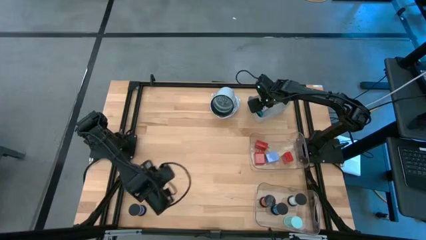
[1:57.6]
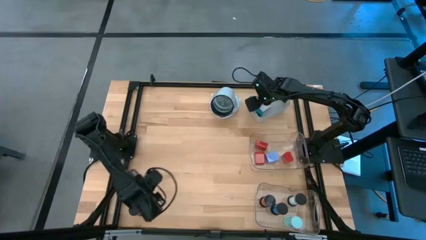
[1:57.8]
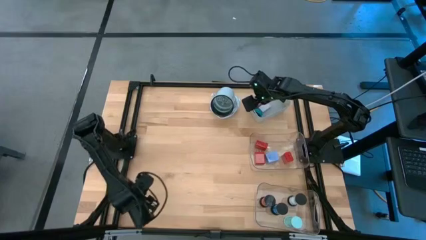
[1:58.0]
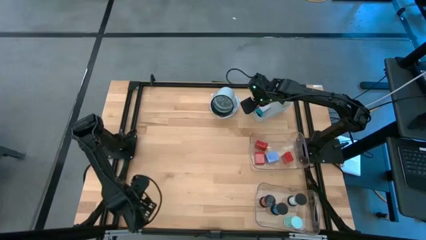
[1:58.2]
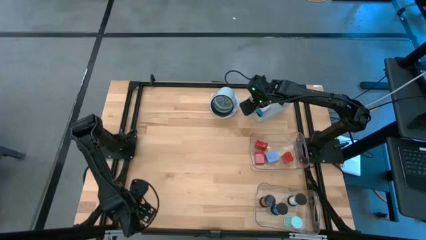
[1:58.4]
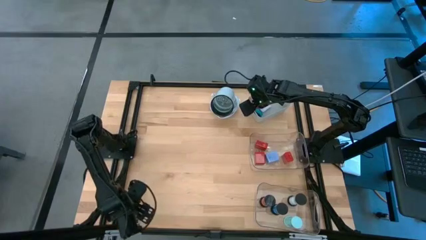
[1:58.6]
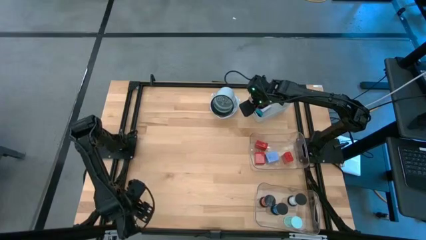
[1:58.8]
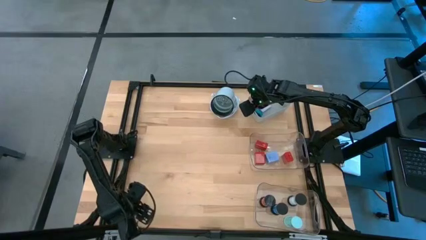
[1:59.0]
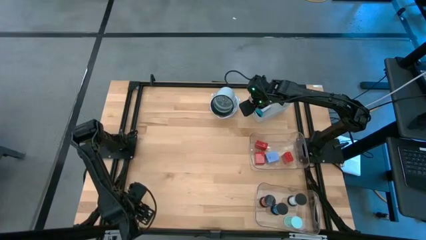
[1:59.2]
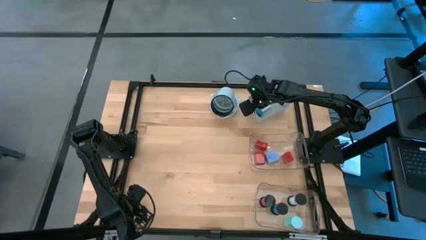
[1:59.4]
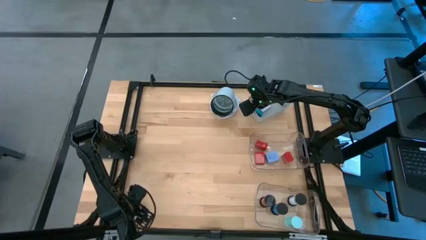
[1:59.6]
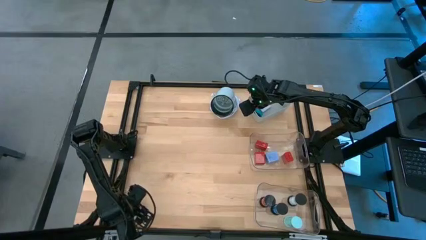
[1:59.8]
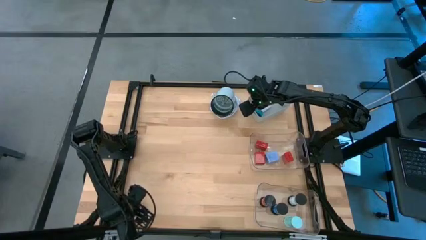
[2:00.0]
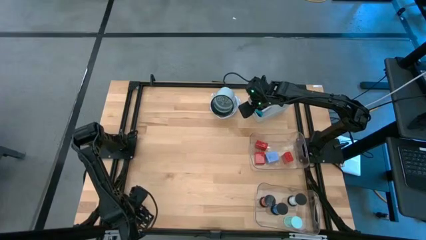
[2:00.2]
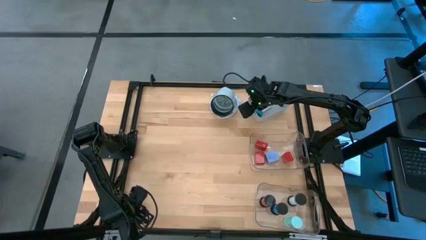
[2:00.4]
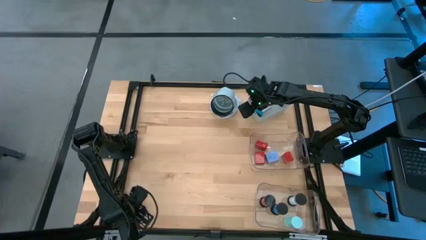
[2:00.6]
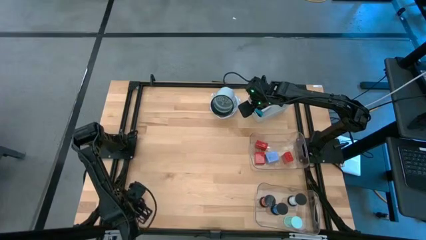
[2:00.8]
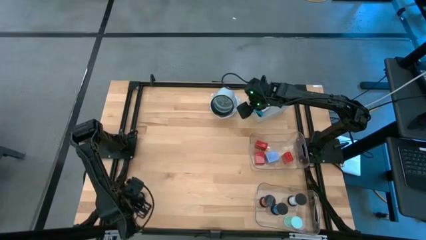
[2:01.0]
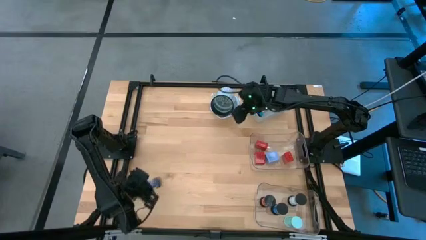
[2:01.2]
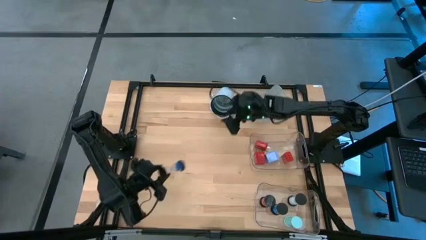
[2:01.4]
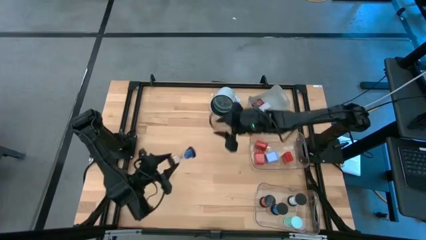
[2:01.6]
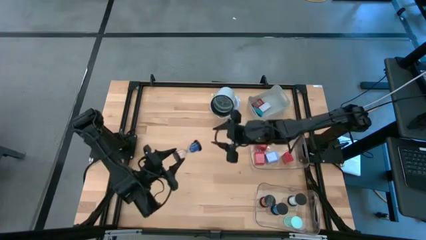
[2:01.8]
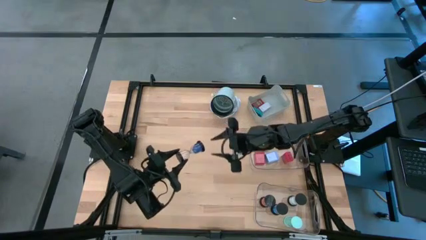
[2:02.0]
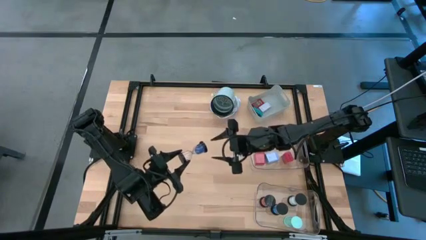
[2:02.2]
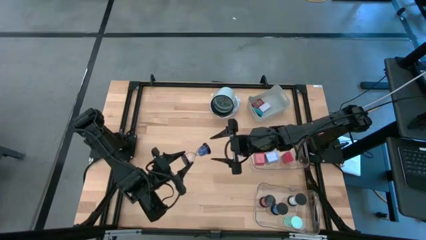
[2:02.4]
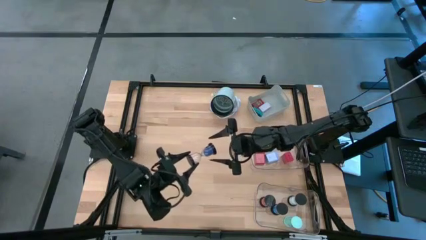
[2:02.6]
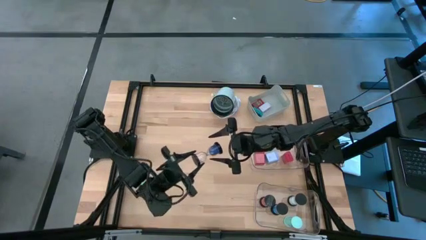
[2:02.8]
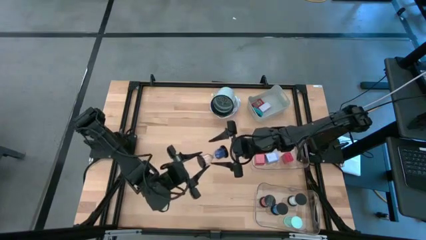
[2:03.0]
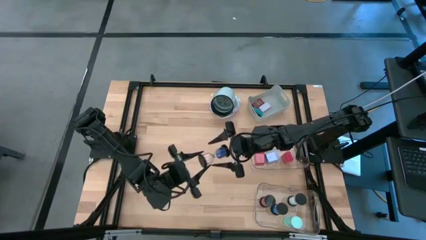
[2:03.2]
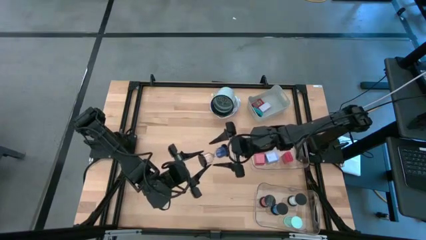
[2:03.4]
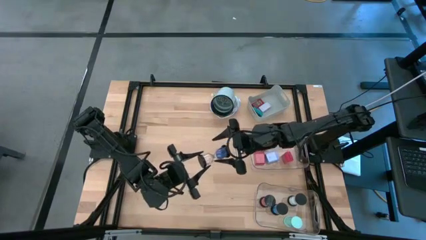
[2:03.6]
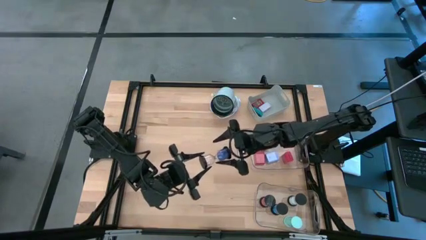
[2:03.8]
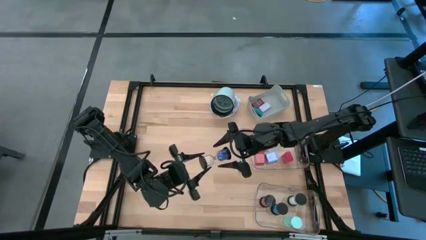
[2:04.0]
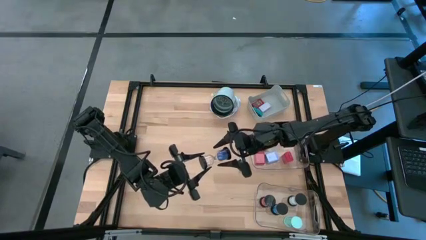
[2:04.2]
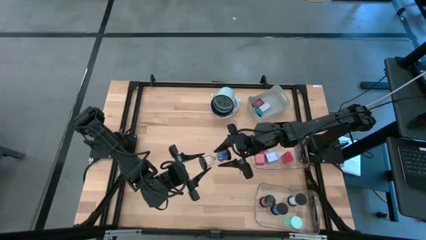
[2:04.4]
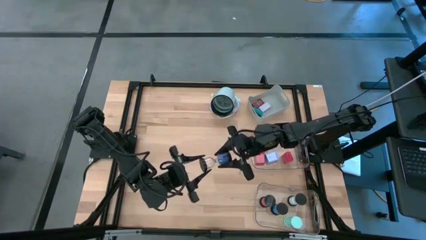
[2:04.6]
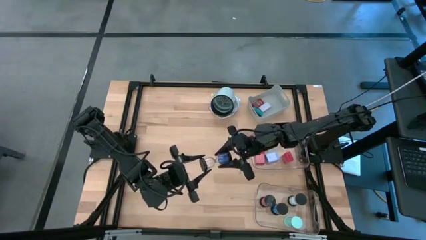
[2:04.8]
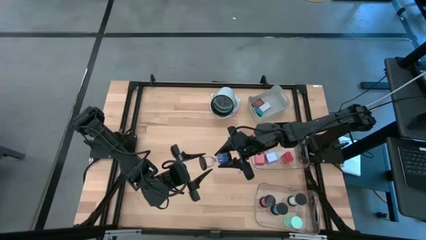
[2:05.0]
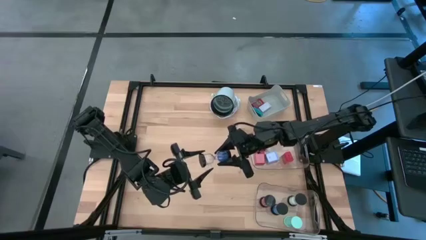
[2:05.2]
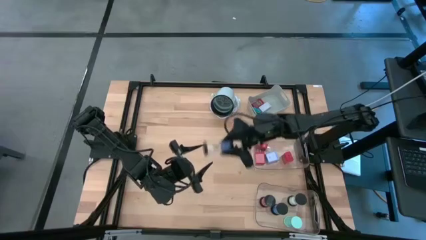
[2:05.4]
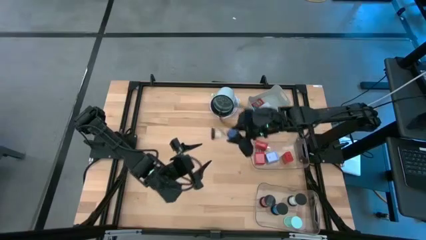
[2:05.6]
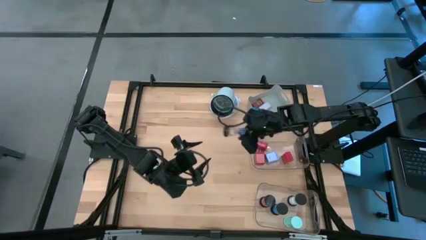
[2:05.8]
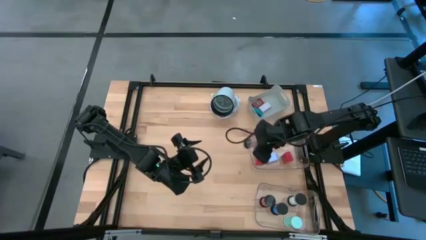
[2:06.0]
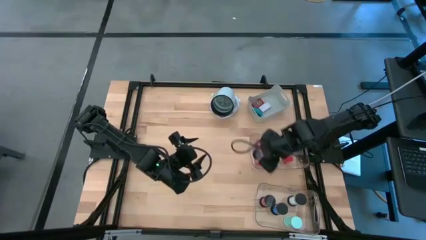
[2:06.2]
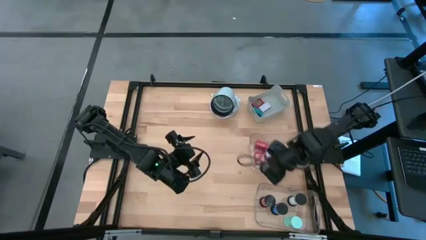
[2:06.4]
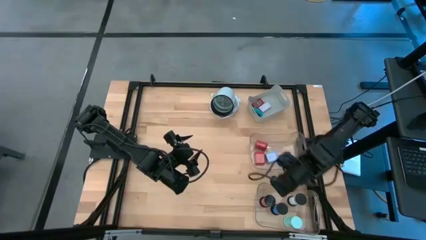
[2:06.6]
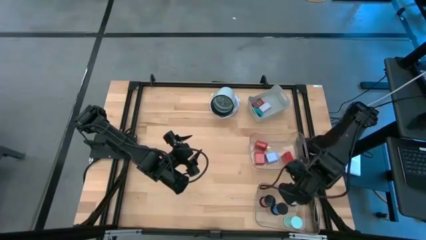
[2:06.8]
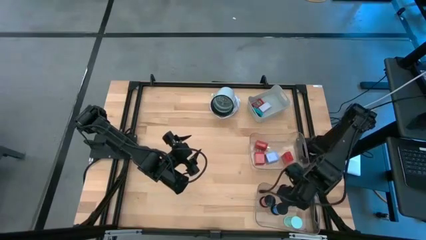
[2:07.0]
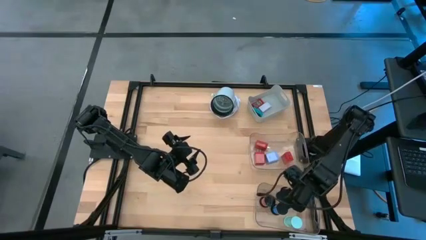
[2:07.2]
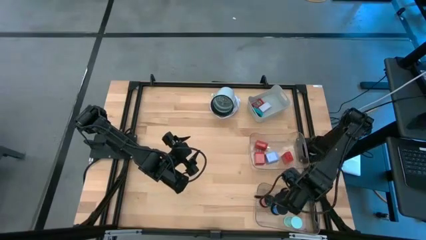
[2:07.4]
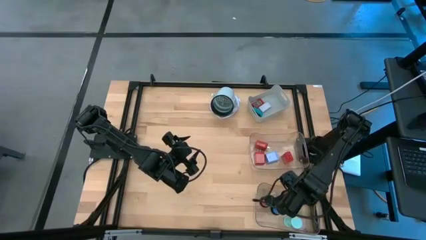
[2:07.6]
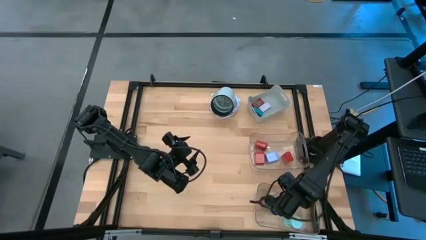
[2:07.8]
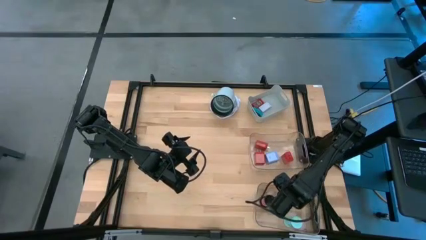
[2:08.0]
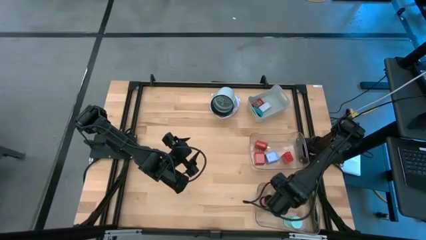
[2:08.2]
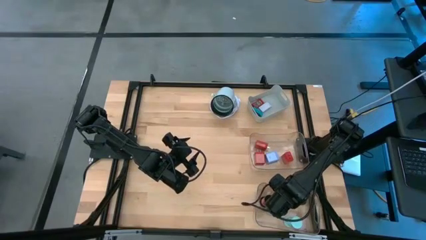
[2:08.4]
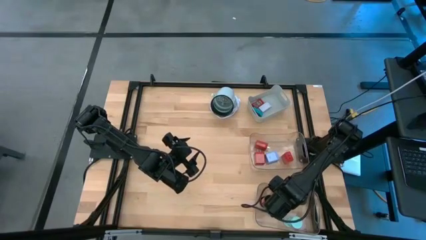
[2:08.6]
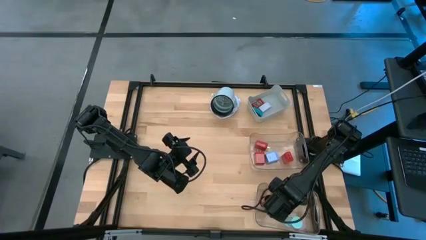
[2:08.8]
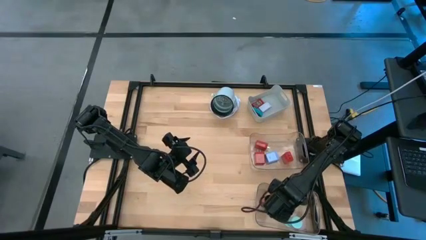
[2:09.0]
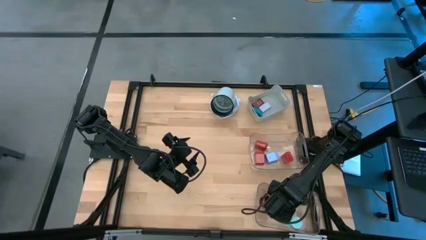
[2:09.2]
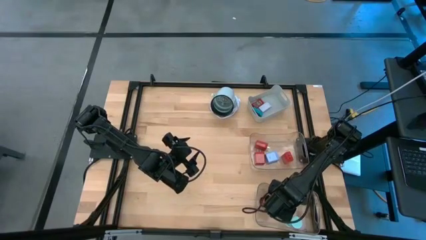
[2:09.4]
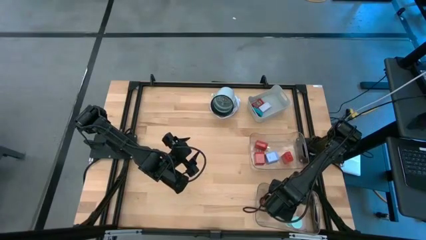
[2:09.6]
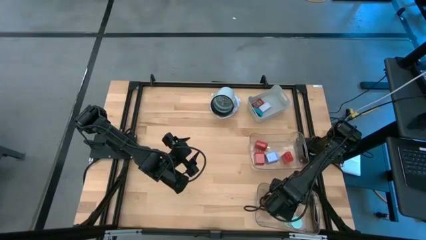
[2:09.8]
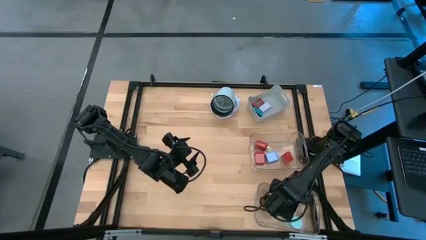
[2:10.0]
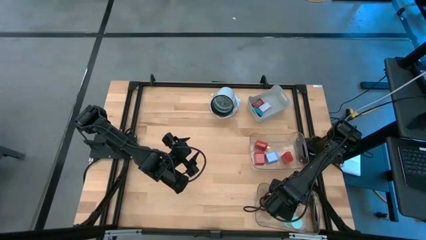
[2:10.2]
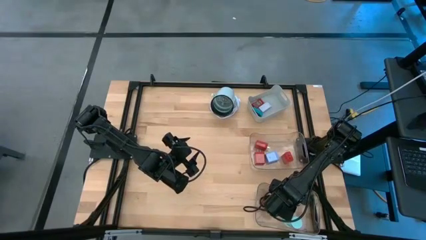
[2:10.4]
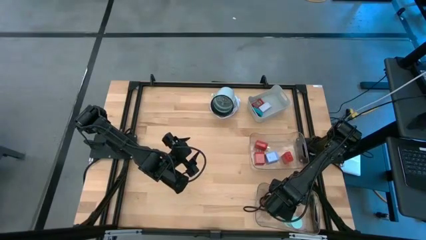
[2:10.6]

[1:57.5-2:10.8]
Task: Pick & Place Office items
Put the blue hourglass into the bottom transparent bin
